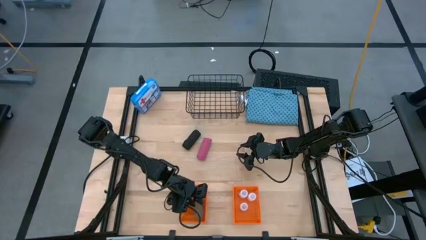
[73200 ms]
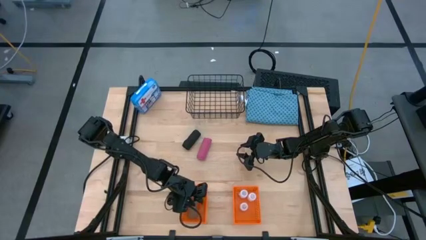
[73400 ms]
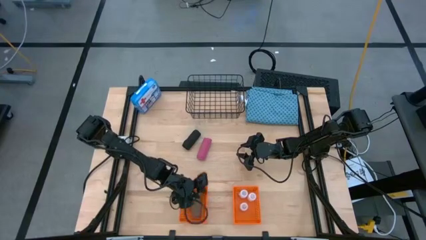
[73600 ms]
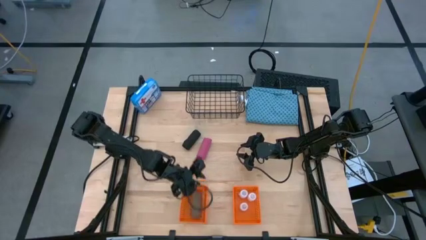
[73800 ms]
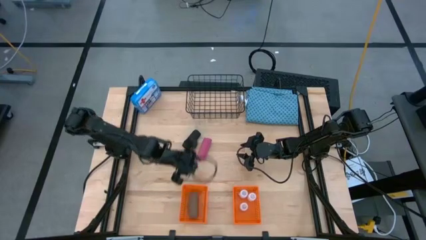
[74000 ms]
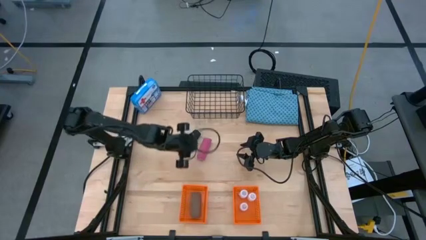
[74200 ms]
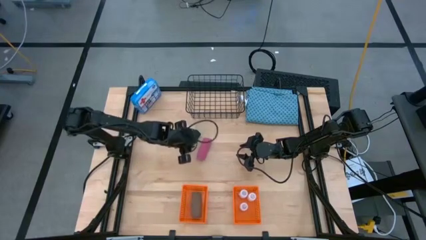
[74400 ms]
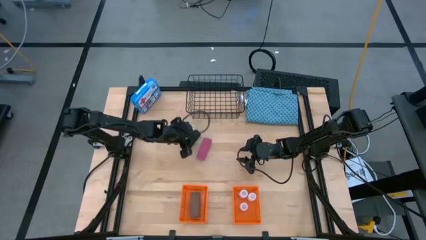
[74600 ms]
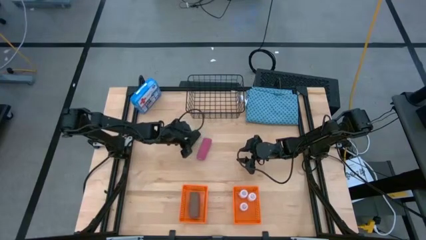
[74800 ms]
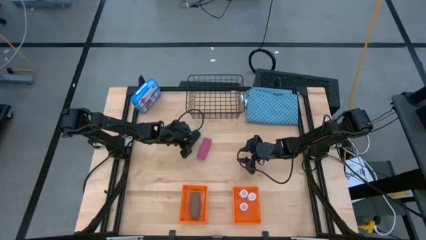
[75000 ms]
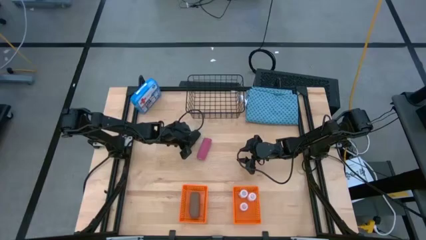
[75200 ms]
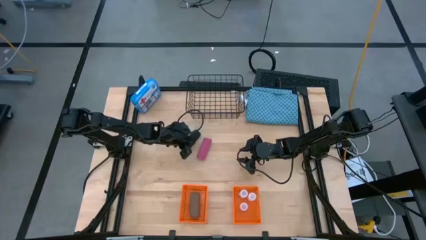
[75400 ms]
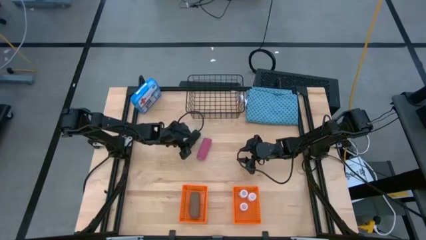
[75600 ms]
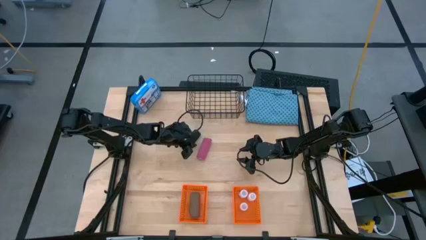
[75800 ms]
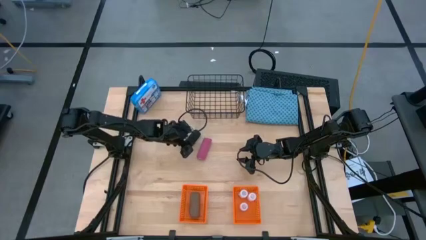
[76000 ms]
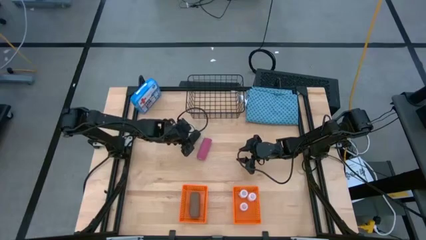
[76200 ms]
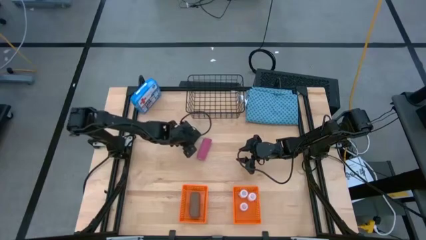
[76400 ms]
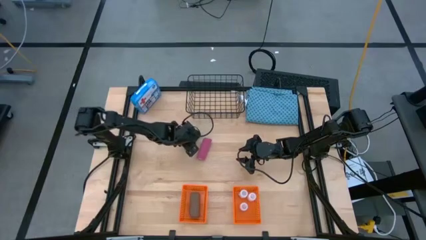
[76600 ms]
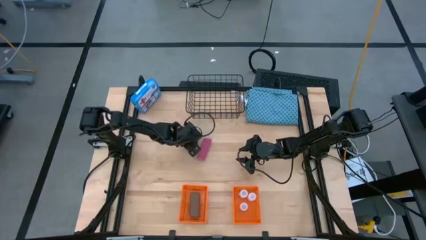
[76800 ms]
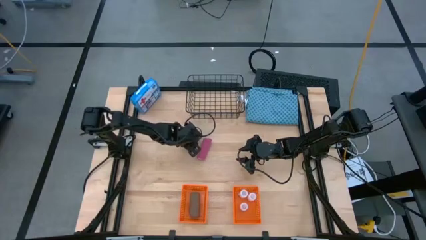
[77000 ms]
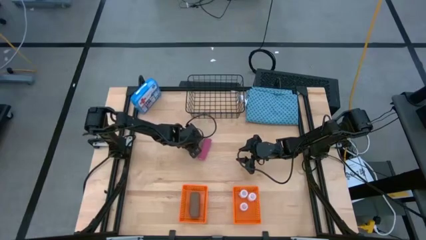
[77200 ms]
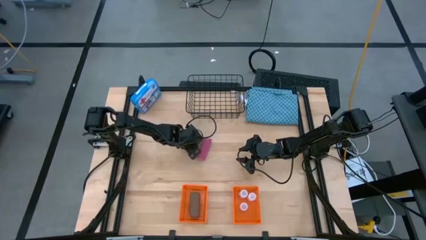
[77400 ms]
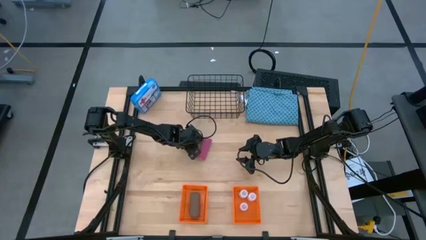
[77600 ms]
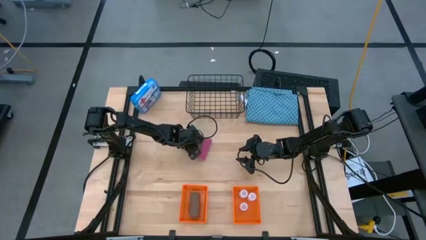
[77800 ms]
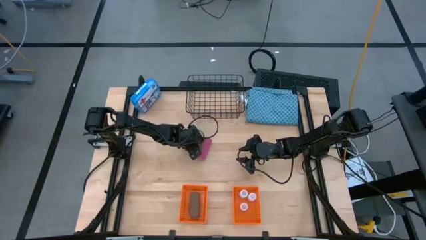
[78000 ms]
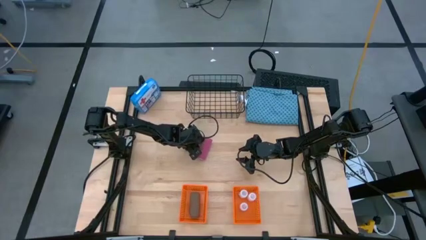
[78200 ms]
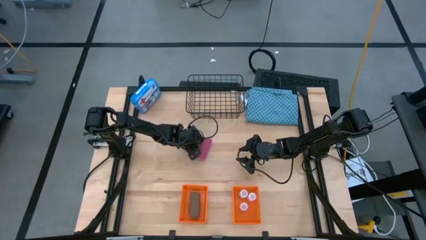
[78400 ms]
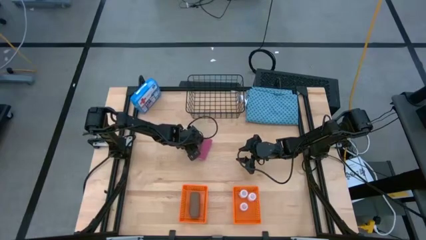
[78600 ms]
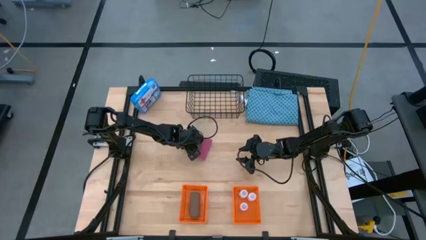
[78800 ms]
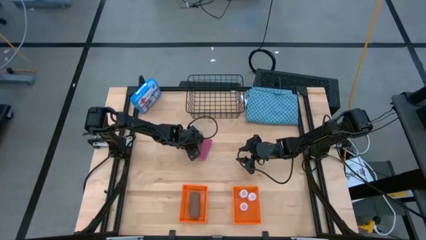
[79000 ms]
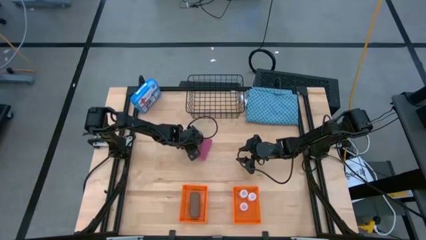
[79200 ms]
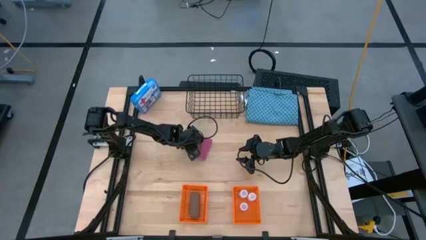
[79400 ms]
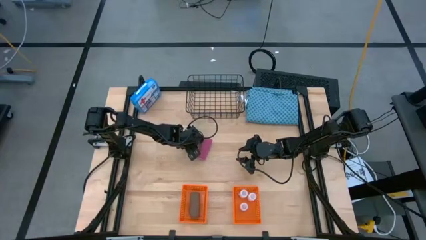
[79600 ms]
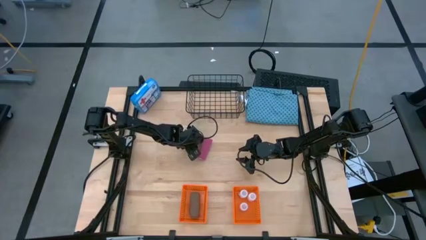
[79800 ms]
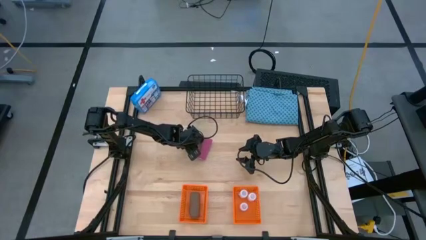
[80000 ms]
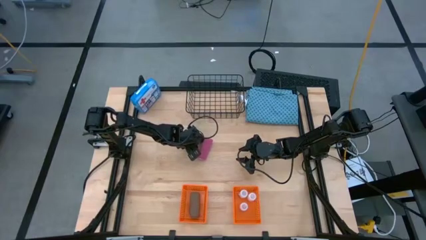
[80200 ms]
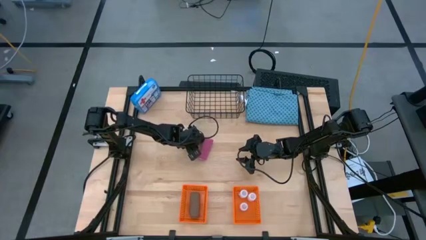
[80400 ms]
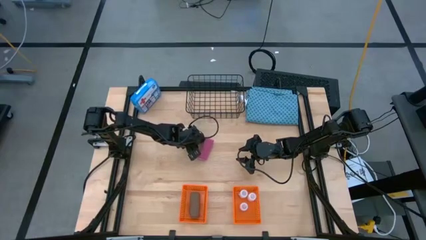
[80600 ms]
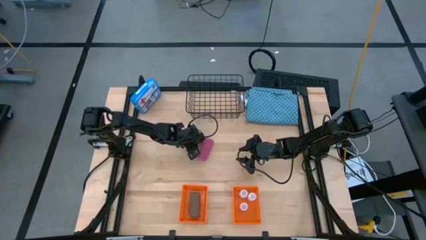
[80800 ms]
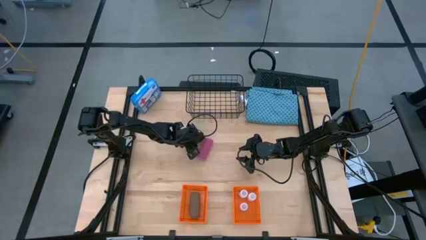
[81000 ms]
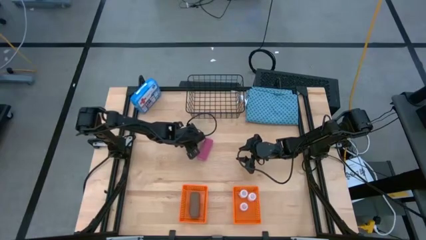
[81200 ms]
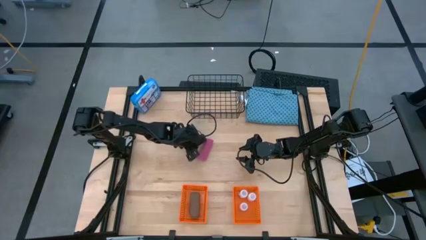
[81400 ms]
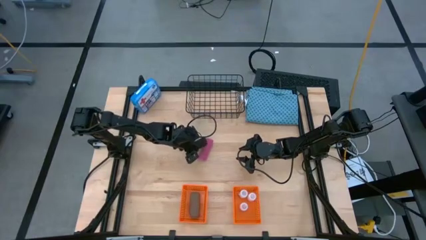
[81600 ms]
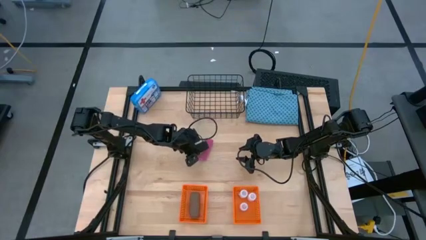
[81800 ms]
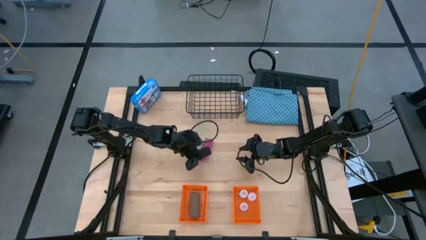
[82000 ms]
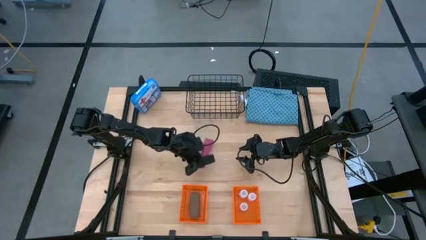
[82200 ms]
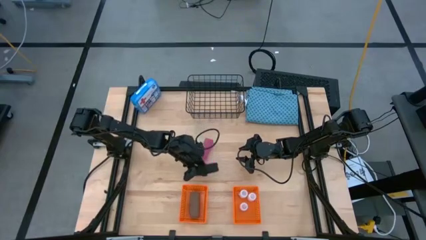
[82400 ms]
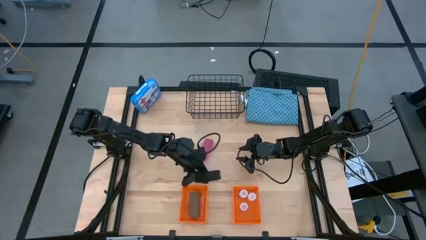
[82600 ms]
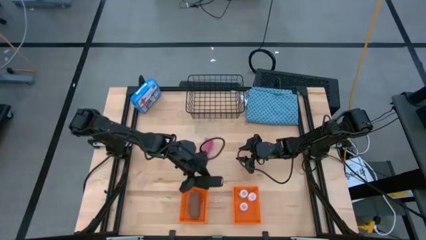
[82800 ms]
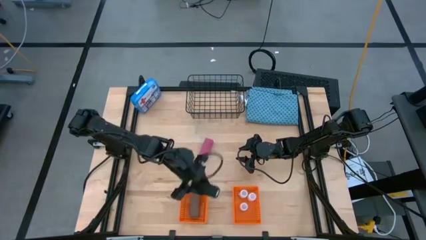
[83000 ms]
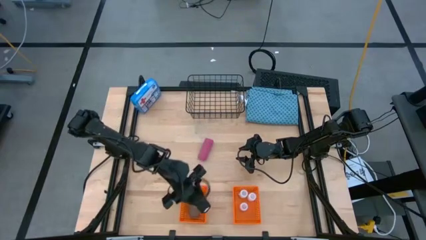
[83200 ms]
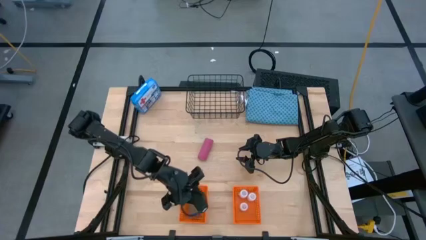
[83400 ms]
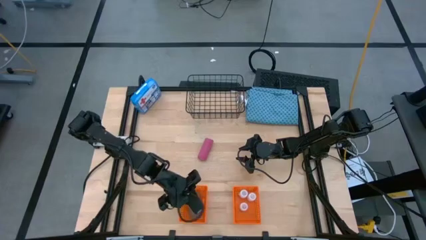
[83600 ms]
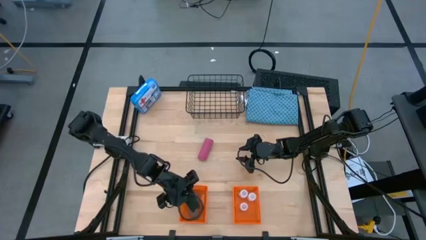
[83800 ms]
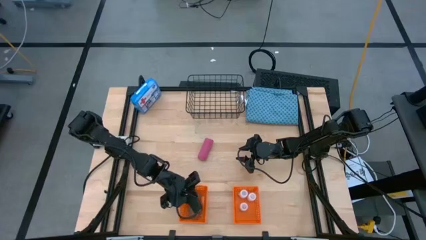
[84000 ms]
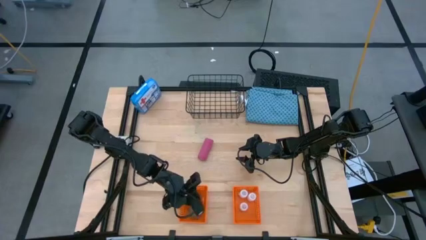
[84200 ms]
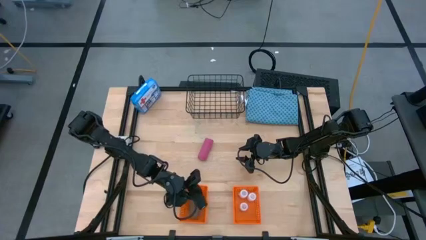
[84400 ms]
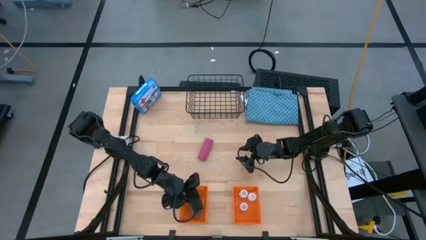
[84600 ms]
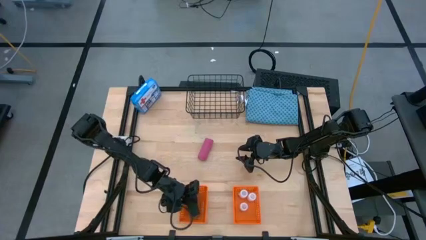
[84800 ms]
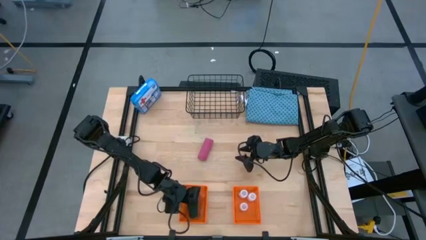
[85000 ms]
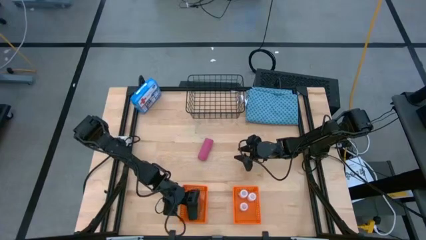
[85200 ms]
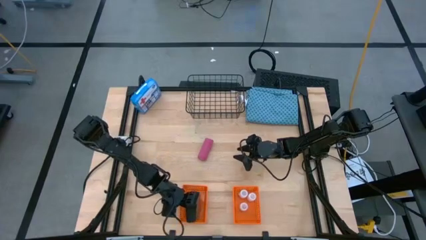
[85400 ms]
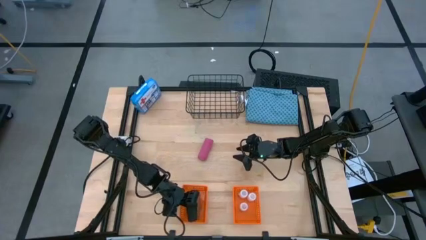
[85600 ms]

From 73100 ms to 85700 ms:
Task: Pick & Place Medicine items
Put the black bandage into the left orange basket
